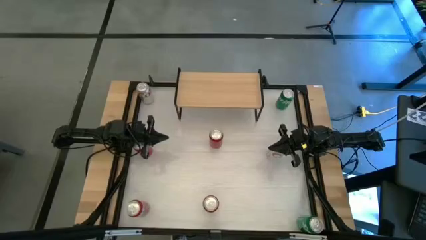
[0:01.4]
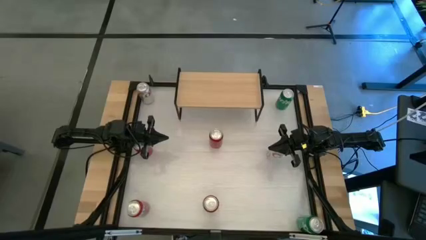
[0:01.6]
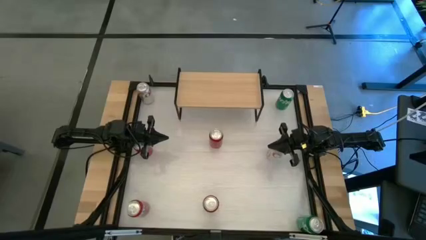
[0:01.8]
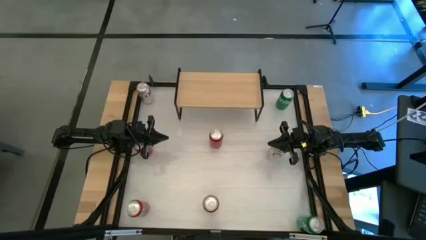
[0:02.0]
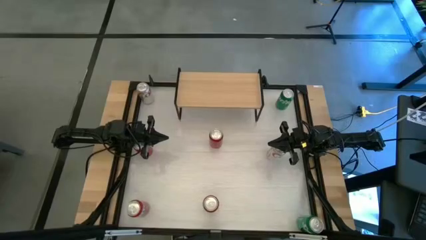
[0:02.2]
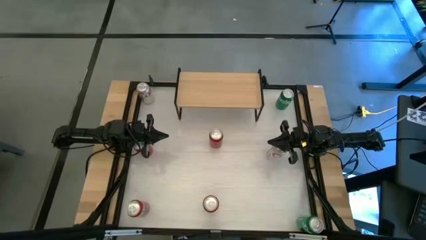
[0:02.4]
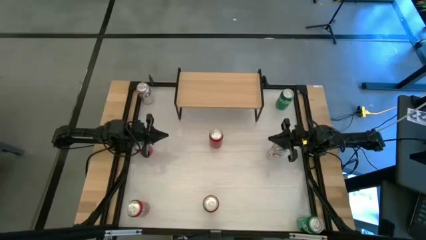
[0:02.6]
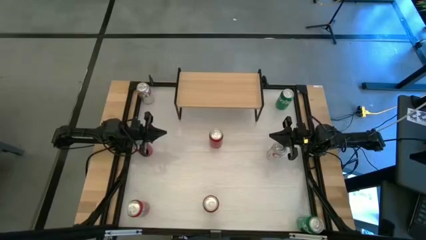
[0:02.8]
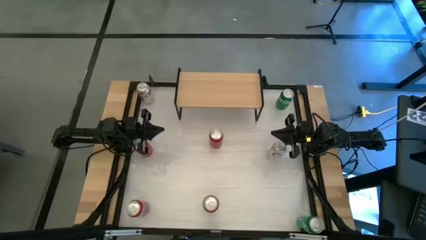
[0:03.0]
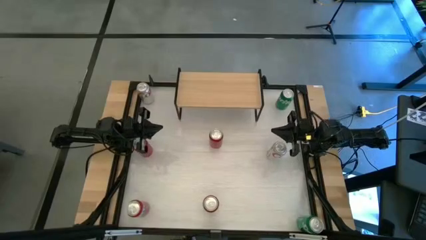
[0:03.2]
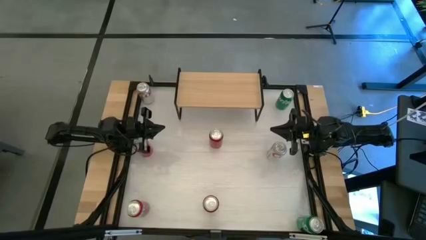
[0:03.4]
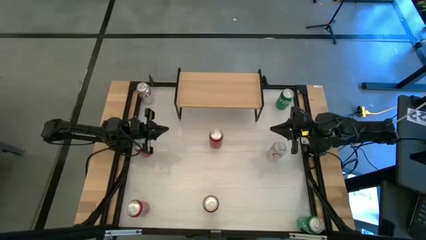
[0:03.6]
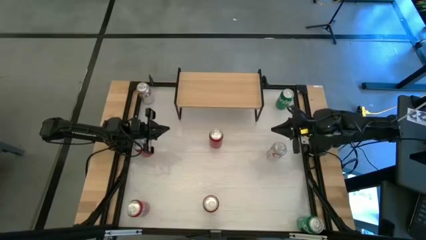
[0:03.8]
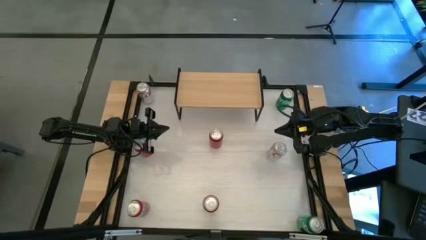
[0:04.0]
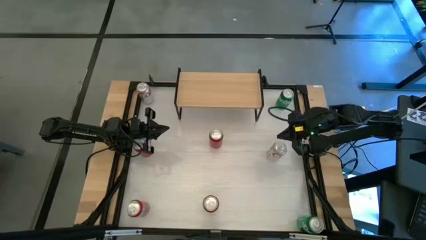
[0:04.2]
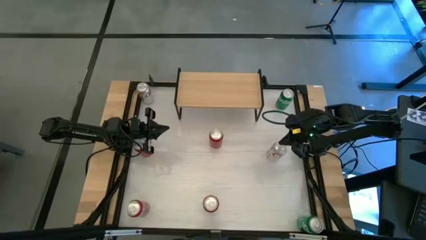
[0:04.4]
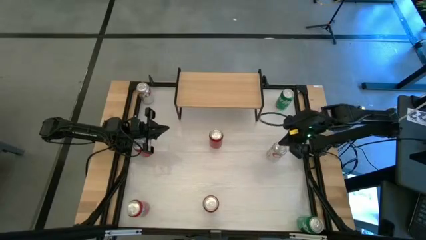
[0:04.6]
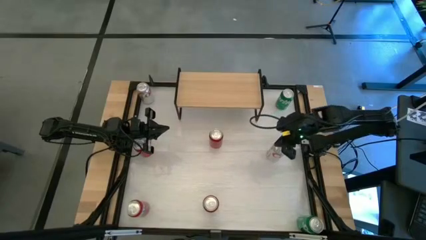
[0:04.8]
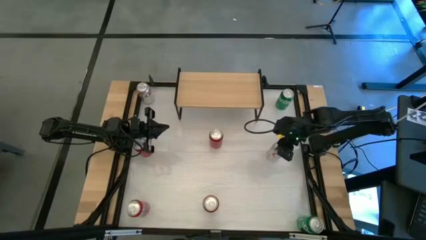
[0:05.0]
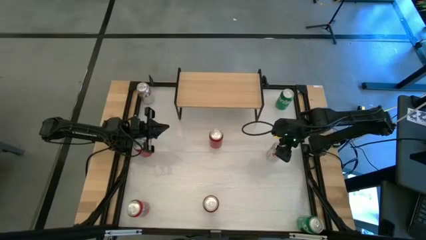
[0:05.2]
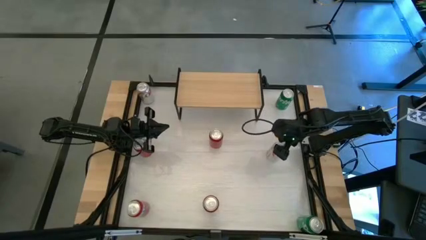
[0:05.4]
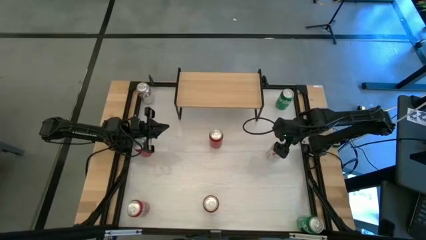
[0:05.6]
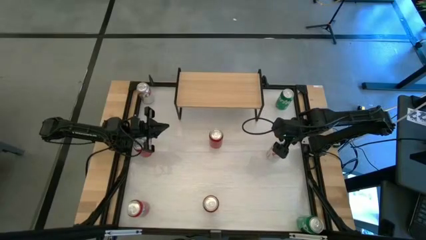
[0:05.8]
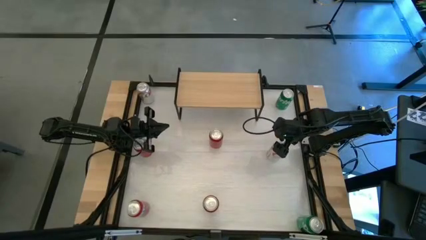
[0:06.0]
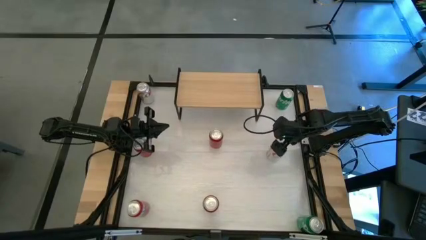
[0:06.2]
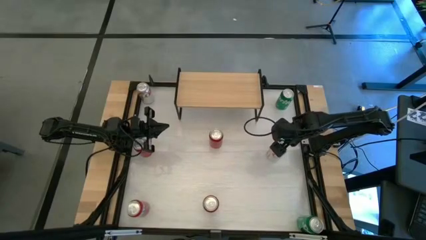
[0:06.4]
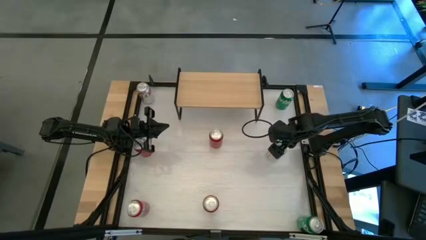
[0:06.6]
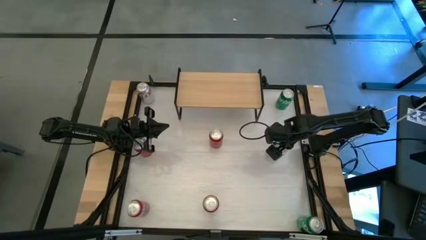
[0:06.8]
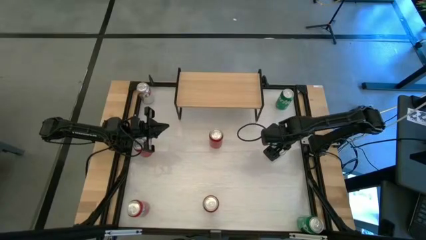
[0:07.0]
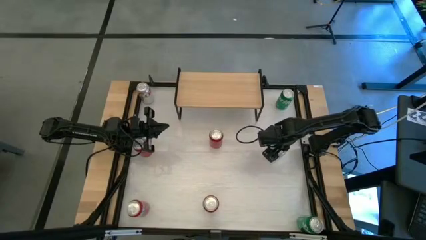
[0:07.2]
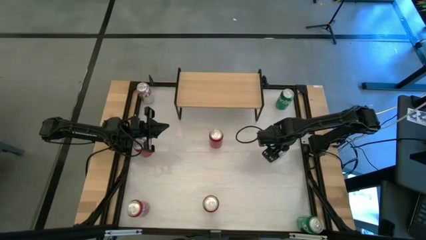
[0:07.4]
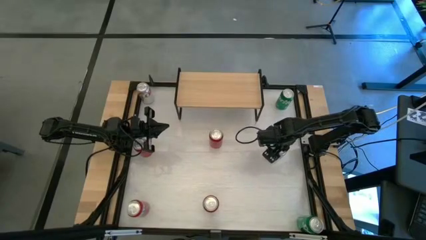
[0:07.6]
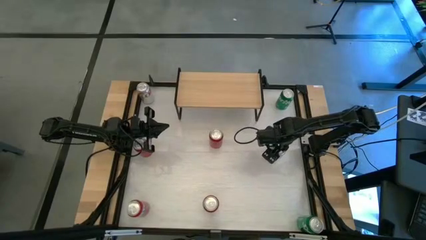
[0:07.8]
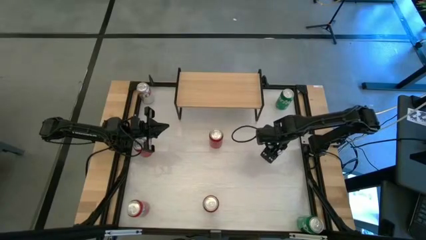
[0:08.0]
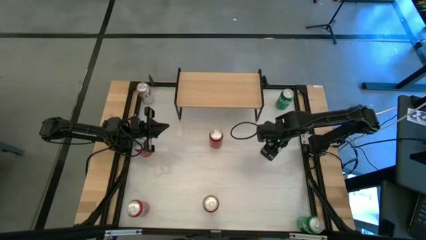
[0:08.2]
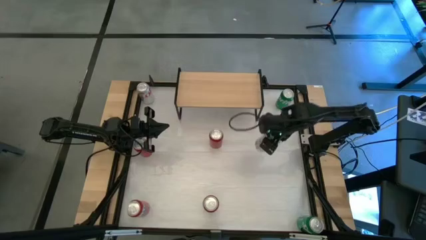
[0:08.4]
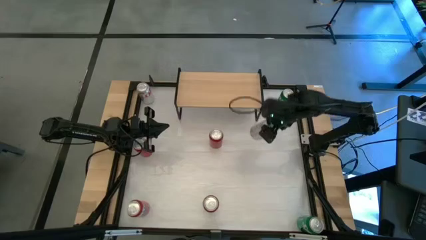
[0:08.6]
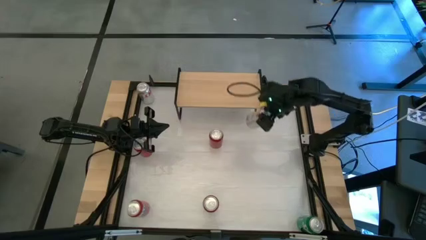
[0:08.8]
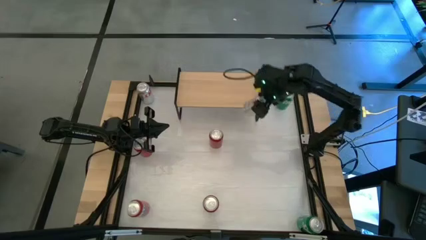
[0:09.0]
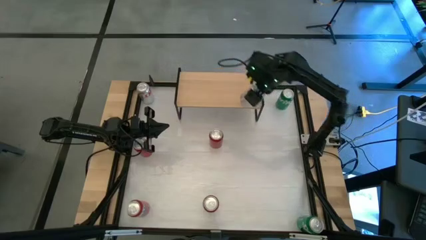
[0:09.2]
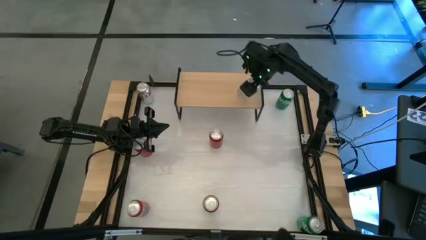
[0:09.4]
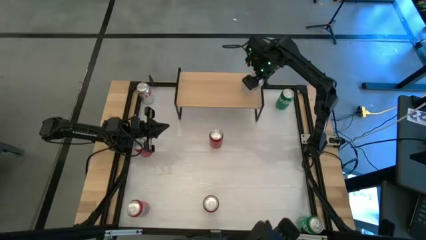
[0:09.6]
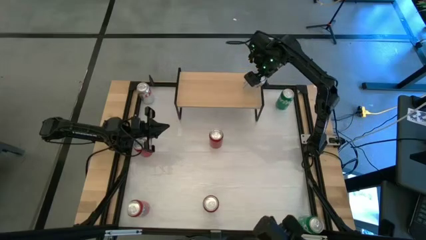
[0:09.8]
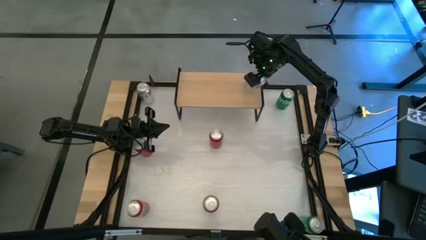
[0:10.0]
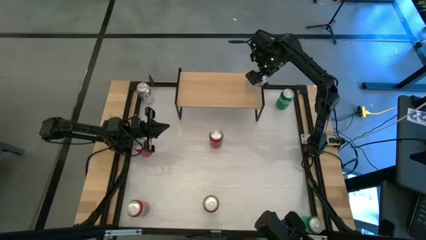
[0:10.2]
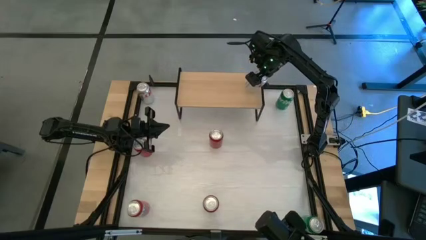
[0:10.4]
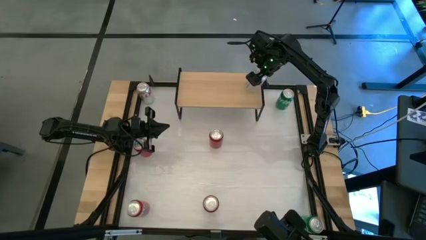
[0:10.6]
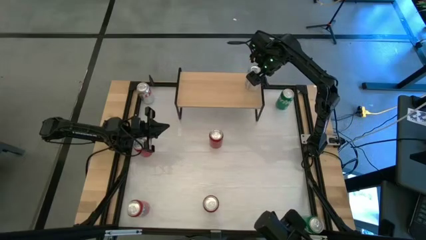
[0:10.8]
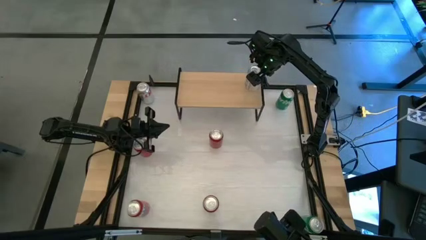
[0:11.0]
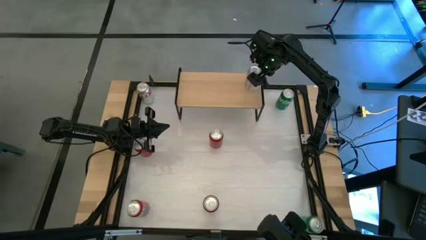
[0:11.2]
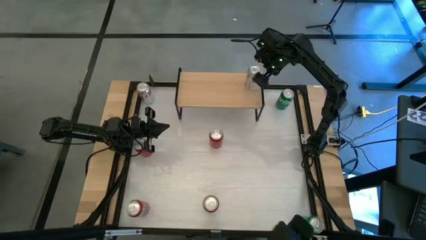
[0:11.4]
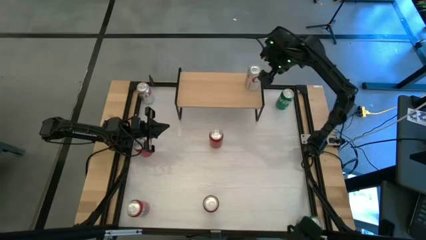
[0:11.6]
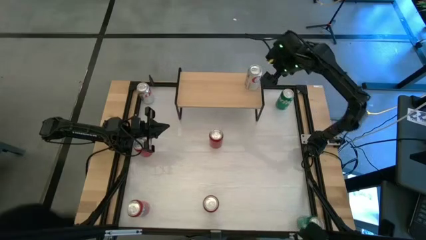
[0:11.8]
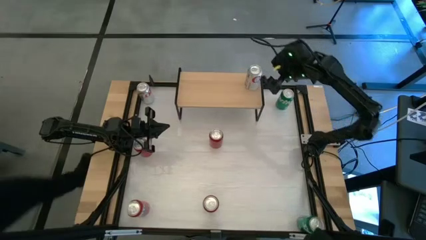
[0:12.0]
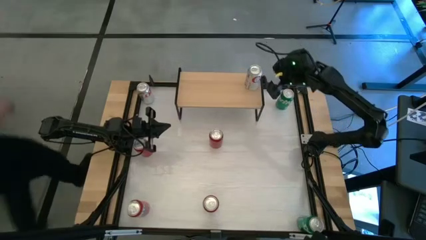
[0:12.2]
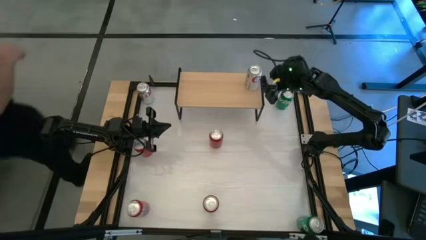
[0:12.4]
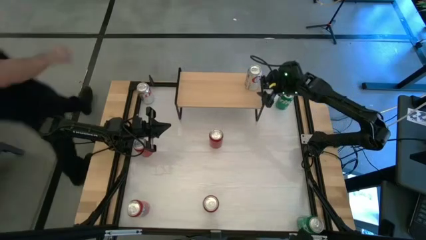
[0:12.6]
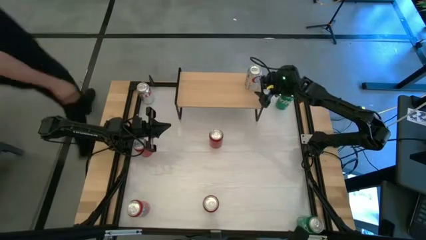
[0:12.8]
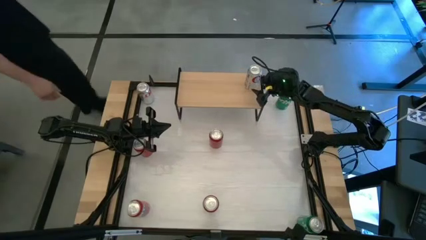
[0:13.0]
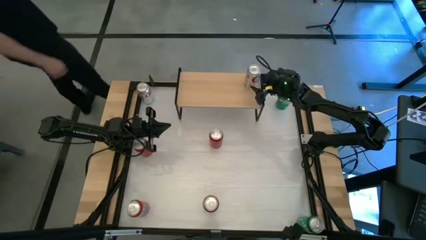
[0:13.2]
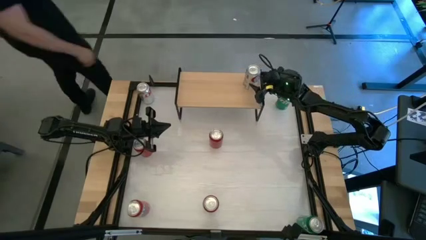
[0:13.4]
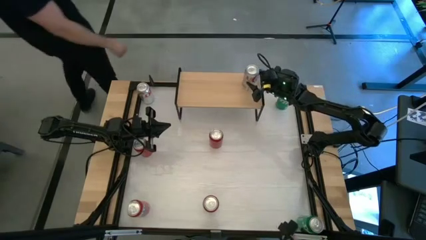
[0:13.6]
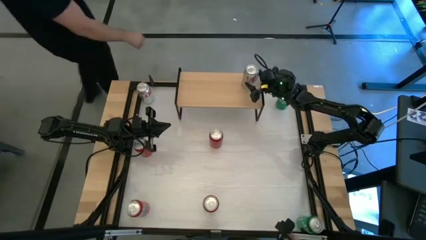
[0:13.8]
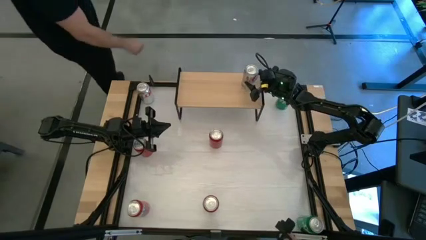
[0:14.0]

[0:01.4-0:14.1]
Task: Place canned beverage on shelf
Put the right white soda can on the shelf
